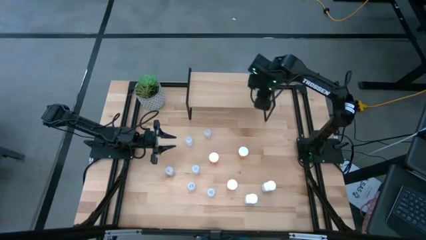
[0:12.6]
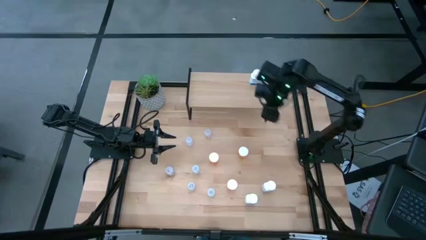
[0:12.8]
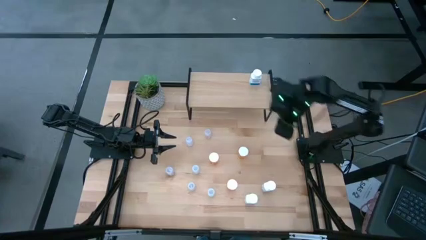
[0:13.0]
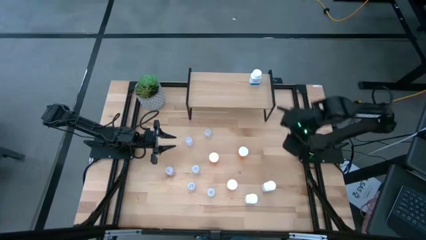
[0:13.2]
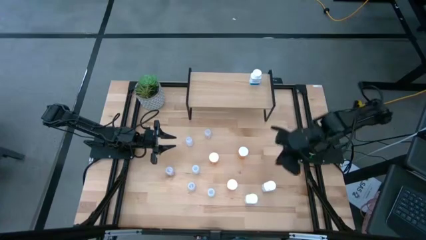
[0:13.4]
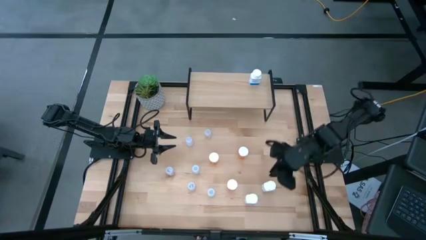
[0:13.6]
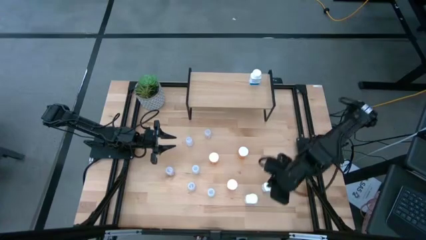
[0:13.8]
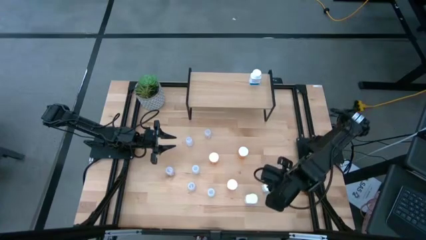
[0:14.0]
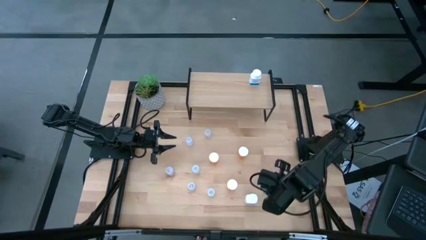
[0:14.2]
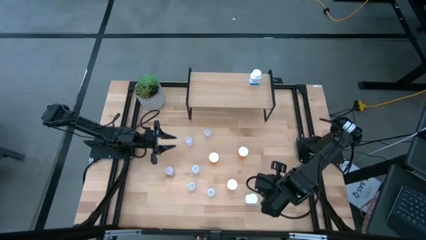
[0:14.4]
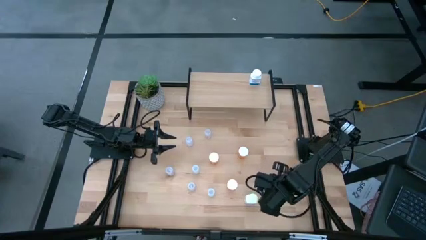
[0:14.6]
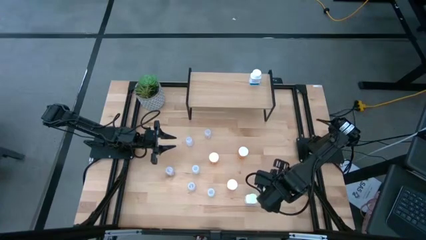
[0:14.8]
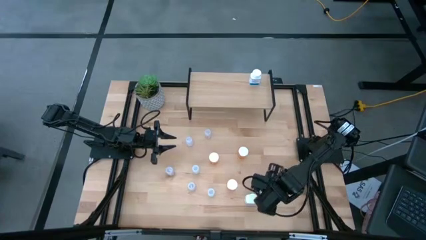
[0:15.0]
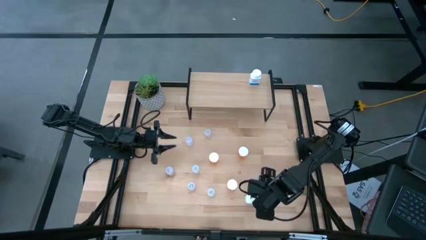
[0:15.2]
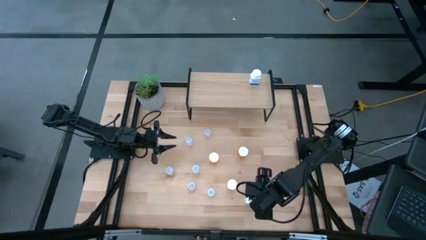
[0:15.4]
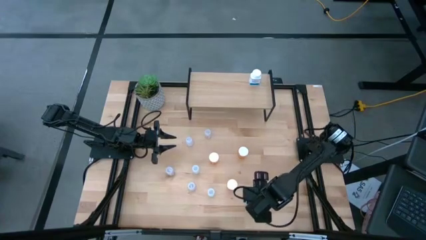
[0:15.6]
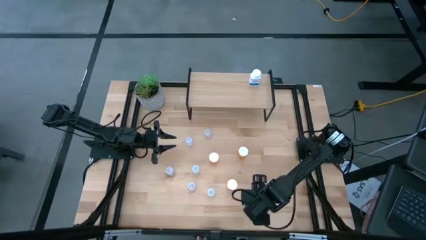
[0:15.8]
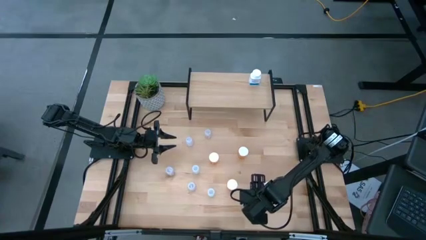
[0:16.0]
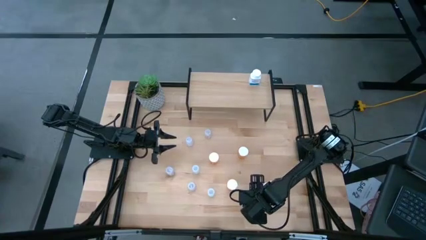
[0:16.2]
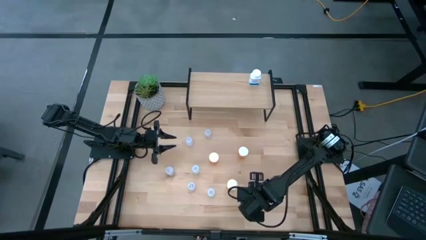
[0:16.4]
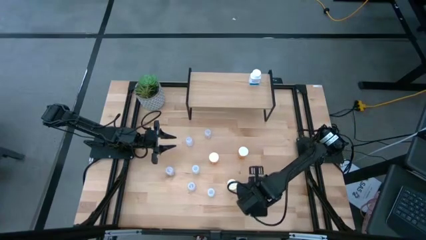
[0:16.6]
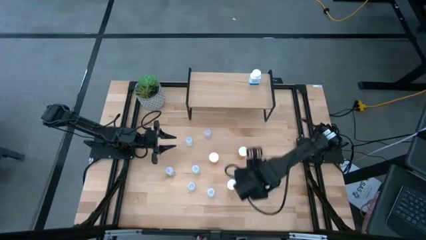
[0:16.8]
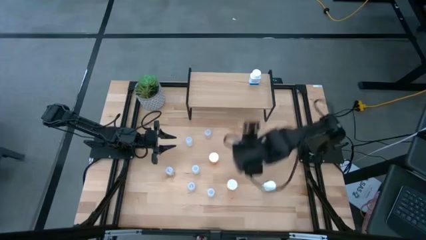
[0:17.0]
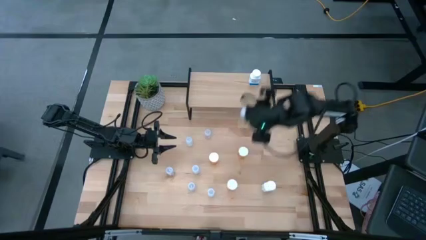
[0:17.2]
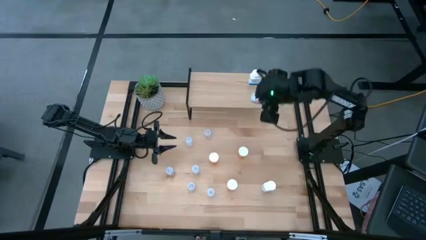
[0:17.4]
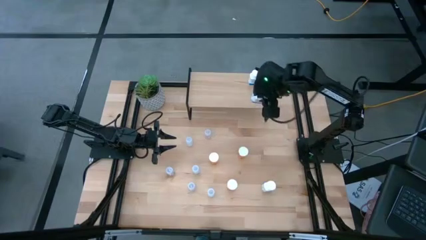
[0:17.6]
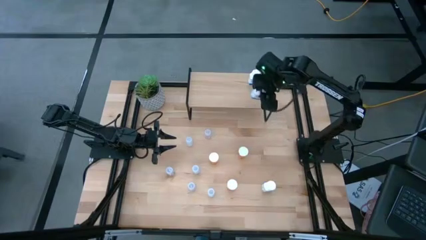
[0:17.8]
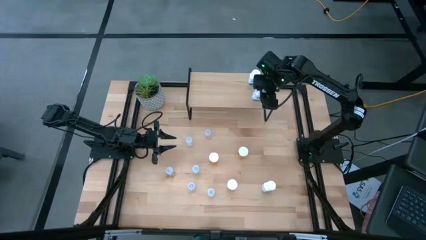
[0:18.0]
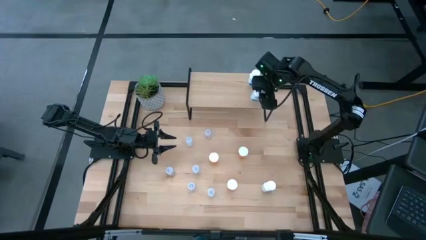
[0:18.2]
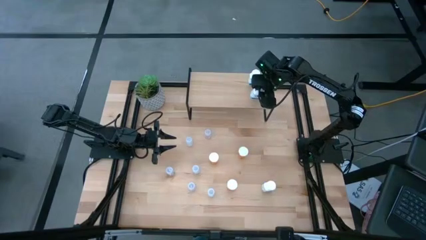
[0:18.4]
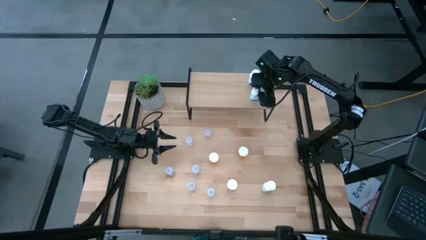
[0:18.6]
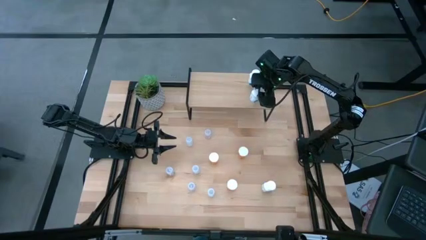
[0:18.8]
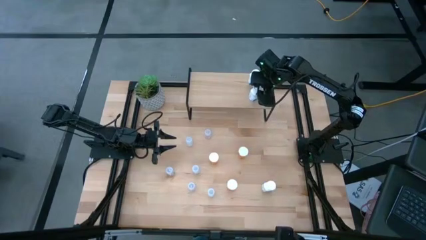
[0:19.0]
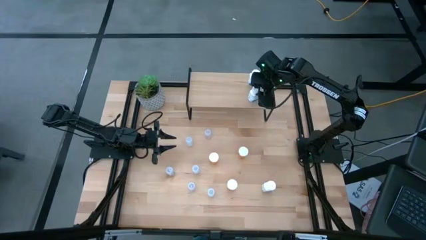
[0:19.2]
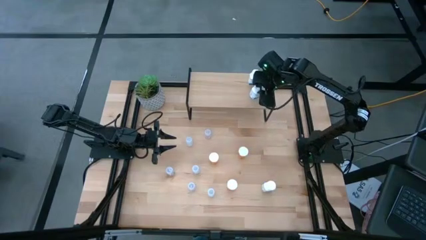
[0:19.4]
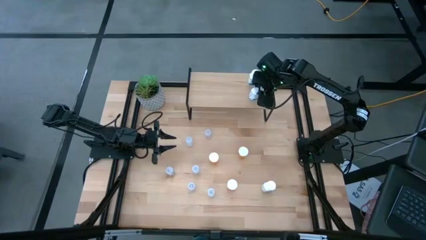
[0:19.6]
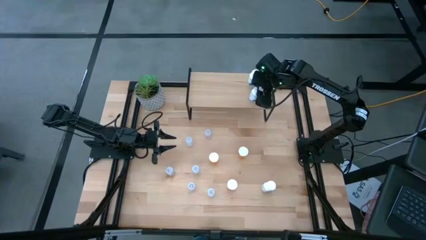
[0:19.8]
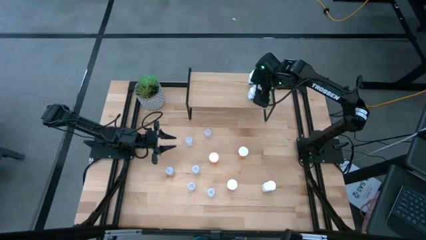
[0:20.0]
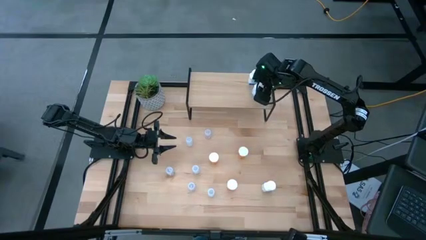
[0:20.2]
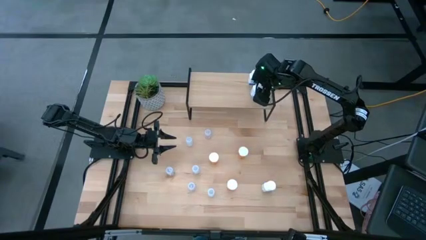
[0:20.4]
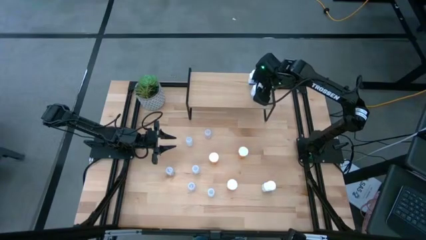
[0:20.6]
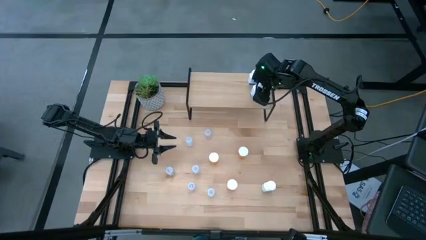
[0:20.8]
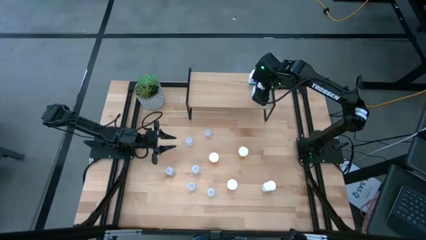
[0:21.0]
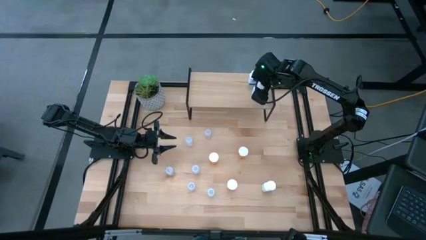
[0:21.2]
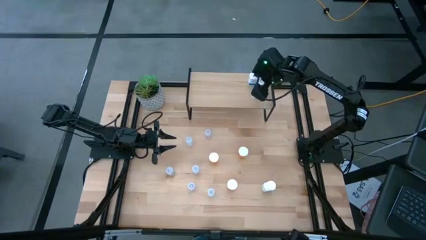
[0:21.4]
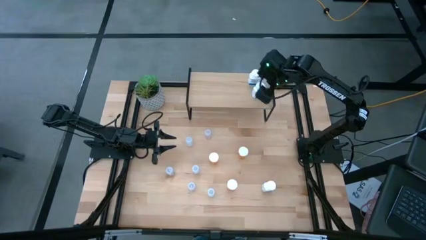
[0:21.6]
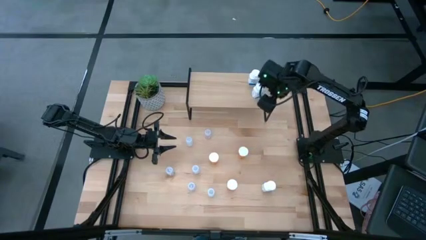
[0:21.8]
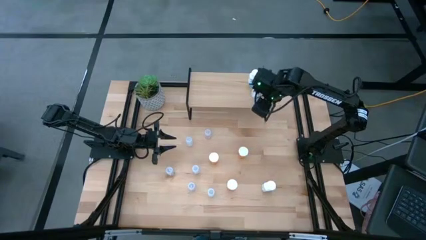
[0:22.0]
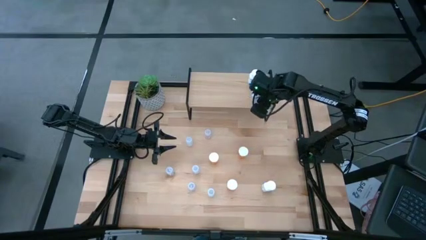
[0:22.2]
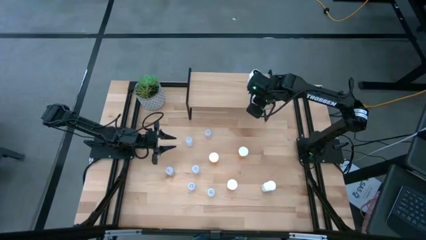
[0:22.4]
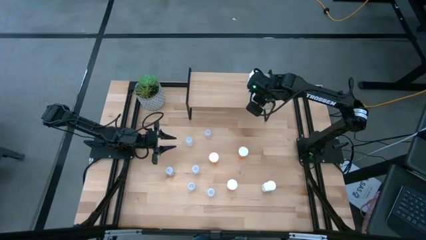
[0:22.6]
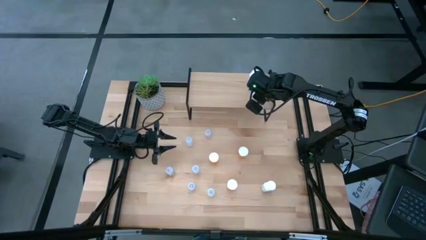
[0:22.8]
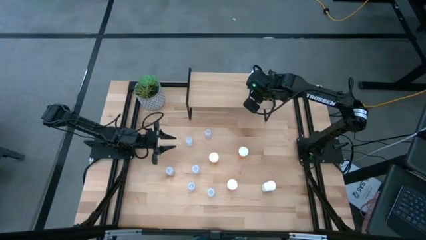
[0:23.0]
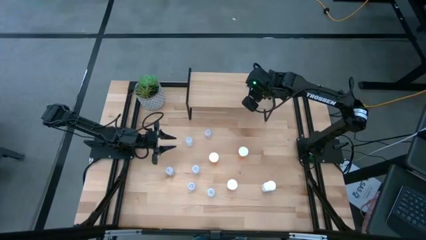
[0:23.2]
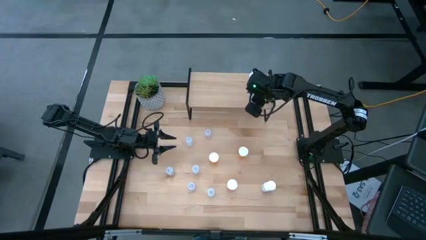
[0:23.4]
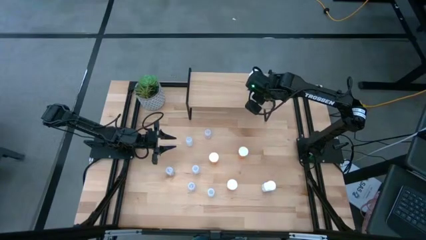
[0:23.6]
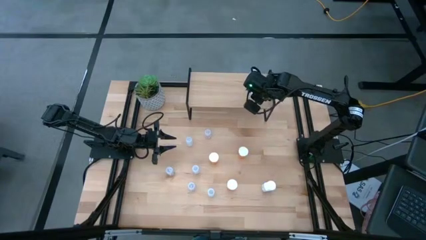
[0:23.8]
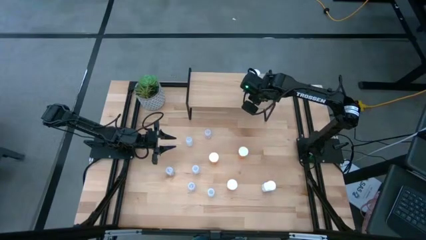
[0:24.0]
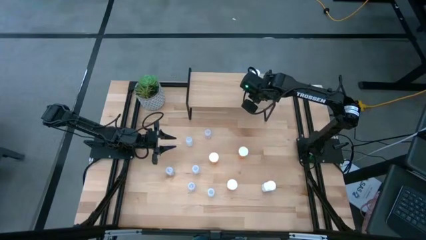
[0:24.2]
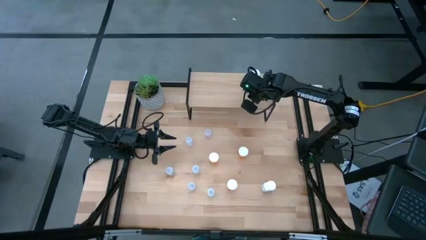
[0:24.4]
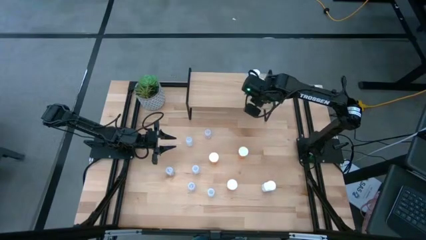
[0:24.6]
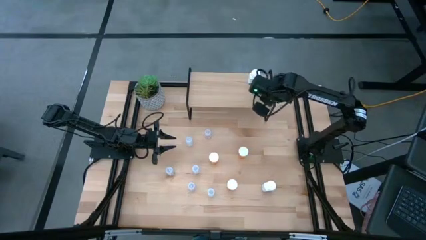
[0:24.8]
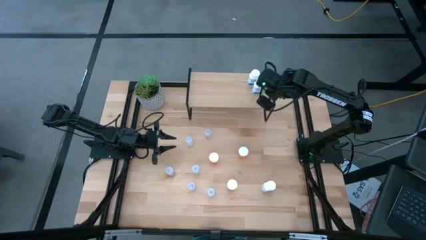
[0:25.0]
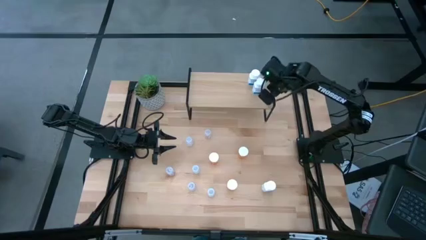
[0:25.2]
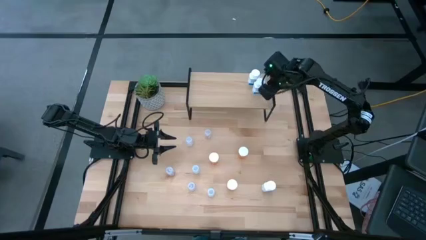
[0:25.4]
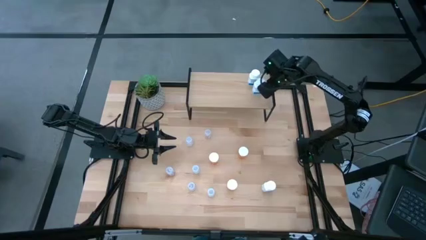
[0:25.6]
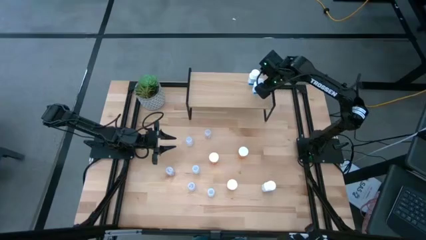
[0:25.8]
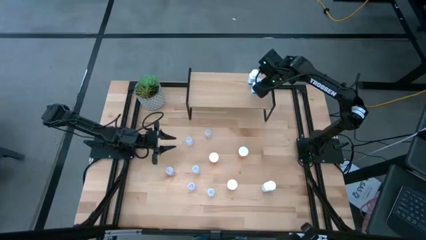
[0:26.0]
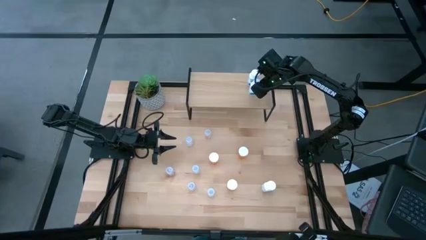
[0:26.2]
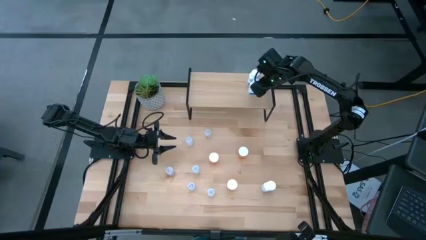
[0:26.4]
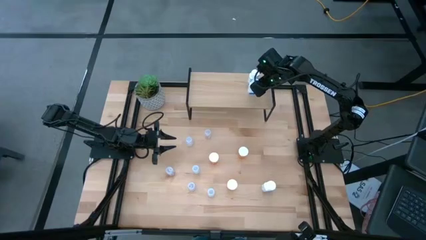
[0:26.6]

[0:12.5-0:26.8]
Task: Pick and place medicine bottles onto shelf by color
Put the bottom white supplement bottle on the shelf aligned with the other white supplement bottle
